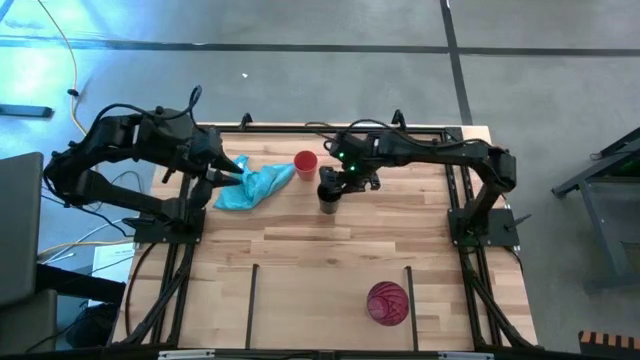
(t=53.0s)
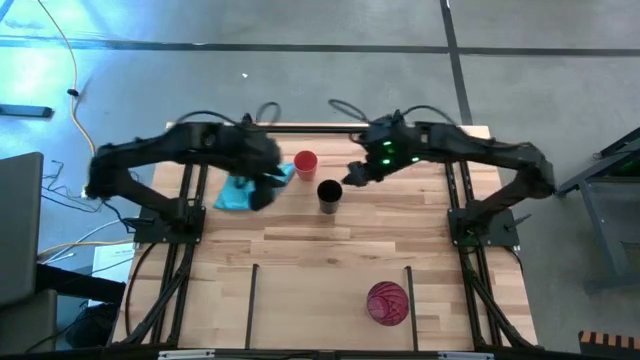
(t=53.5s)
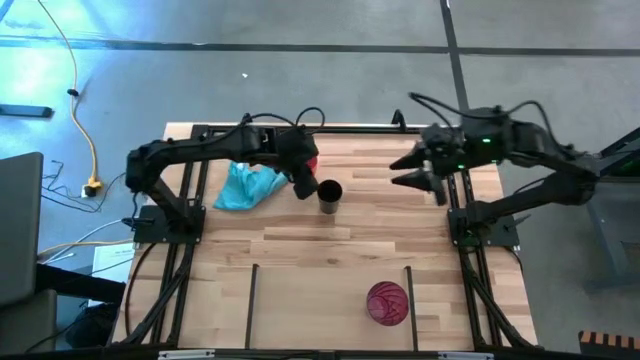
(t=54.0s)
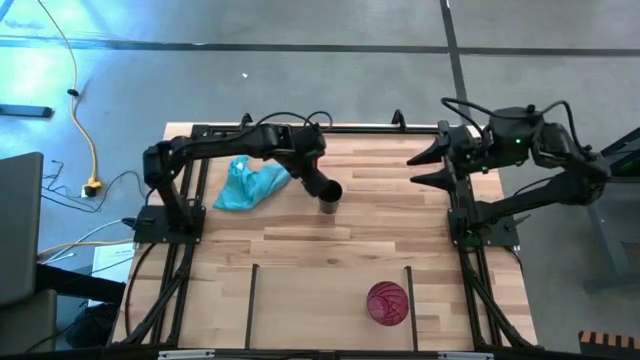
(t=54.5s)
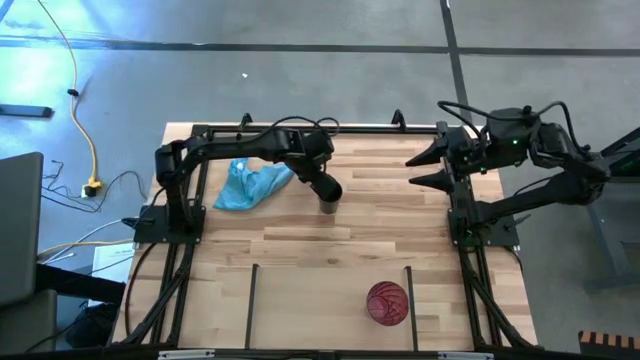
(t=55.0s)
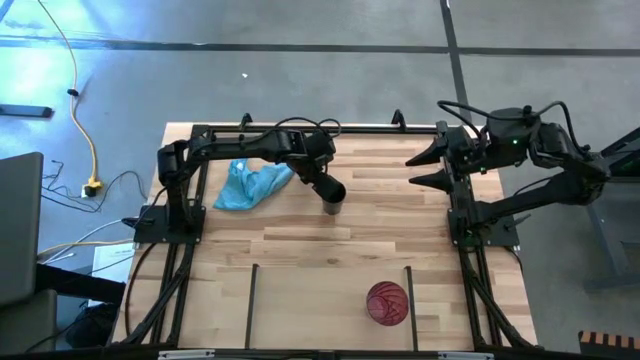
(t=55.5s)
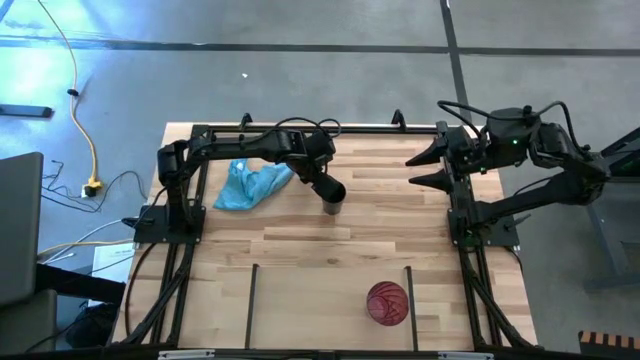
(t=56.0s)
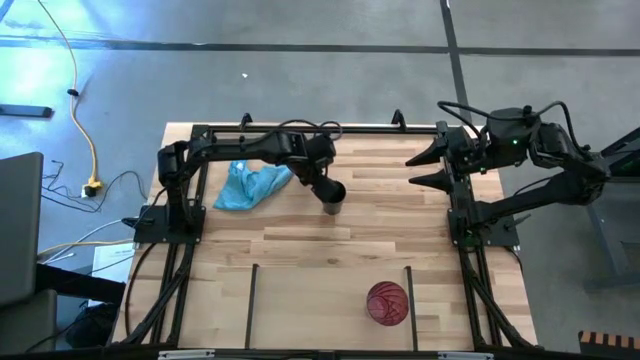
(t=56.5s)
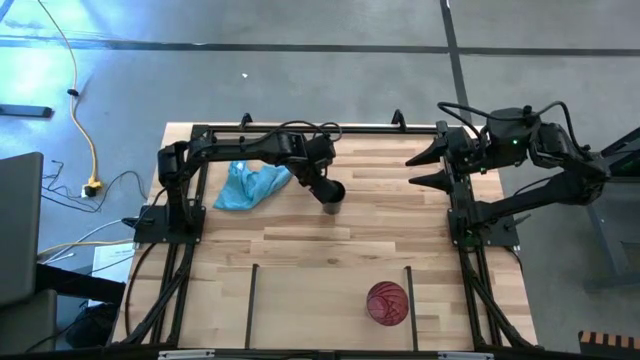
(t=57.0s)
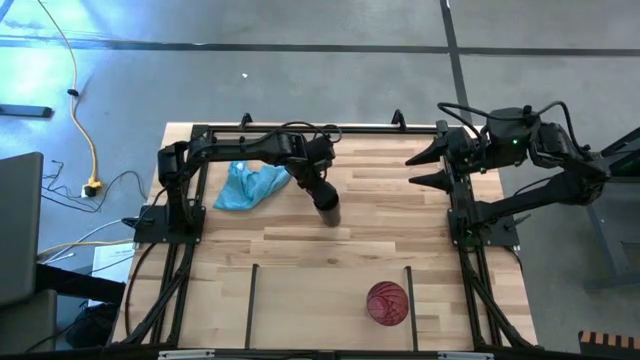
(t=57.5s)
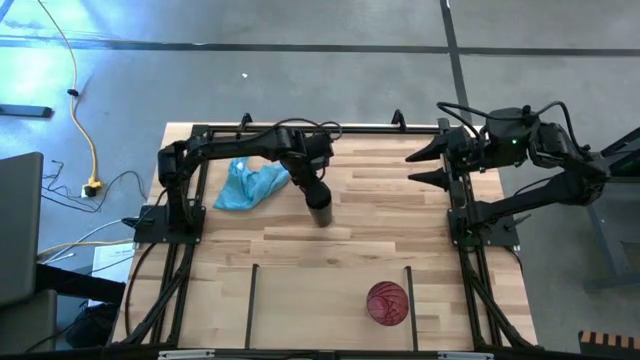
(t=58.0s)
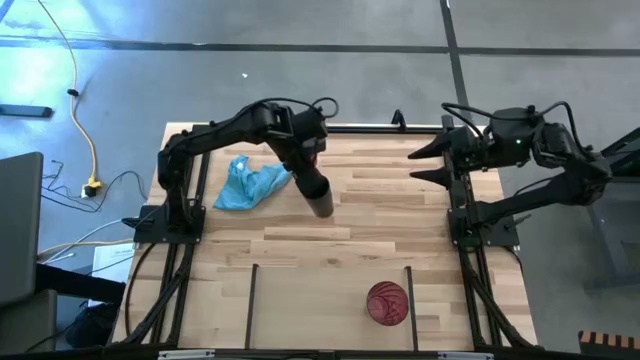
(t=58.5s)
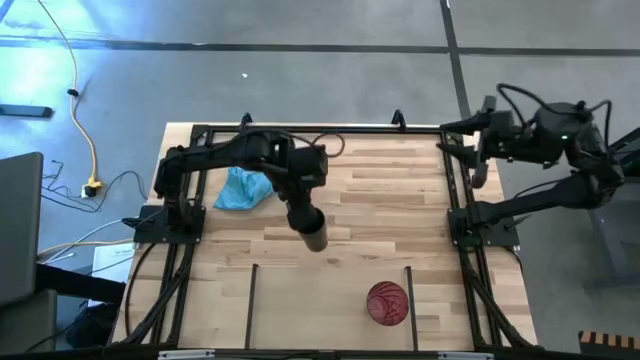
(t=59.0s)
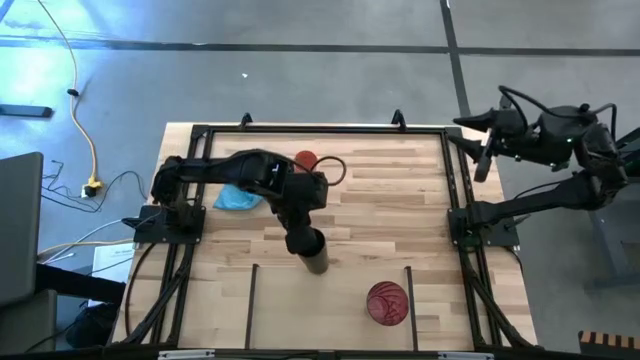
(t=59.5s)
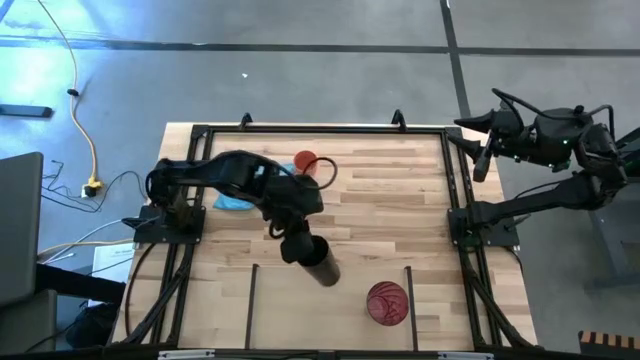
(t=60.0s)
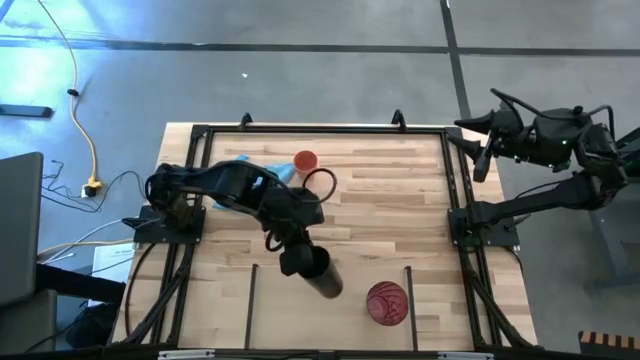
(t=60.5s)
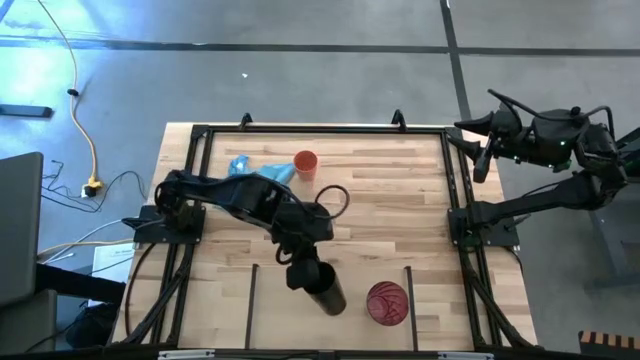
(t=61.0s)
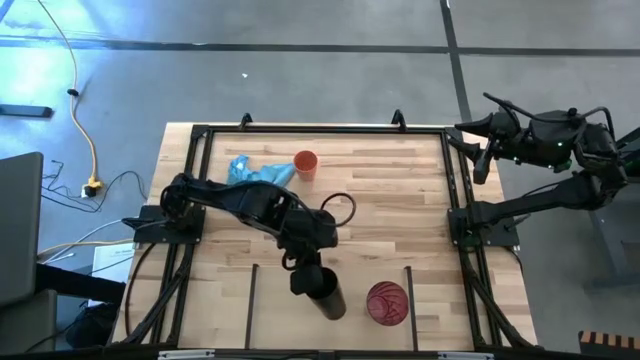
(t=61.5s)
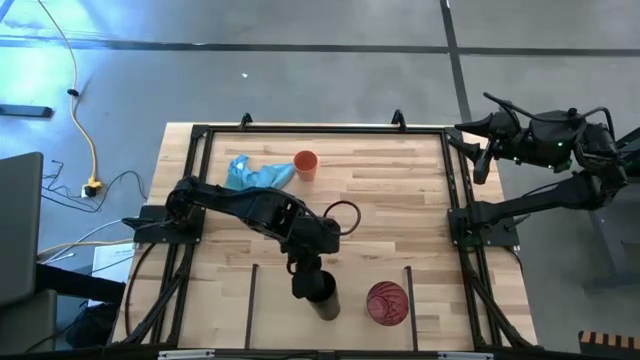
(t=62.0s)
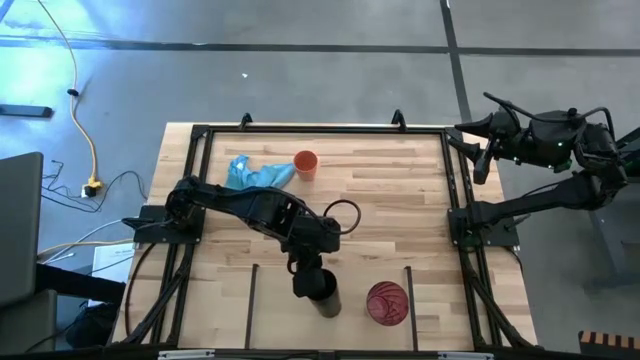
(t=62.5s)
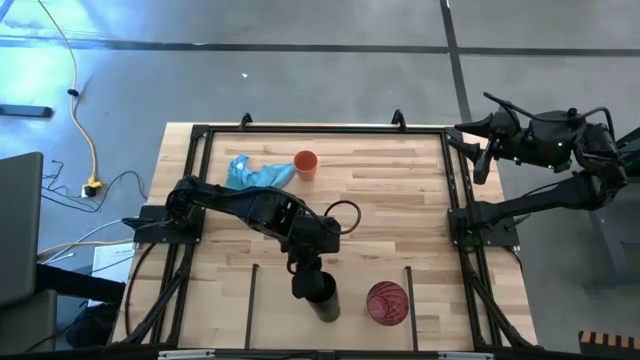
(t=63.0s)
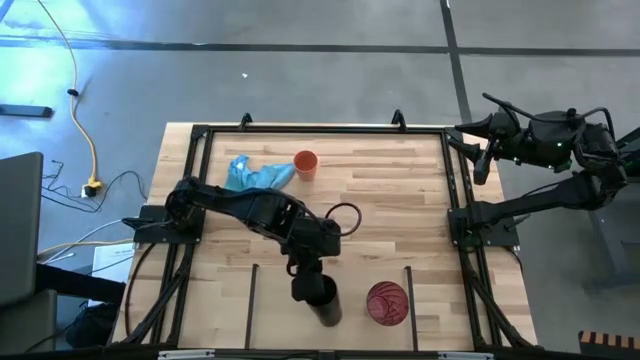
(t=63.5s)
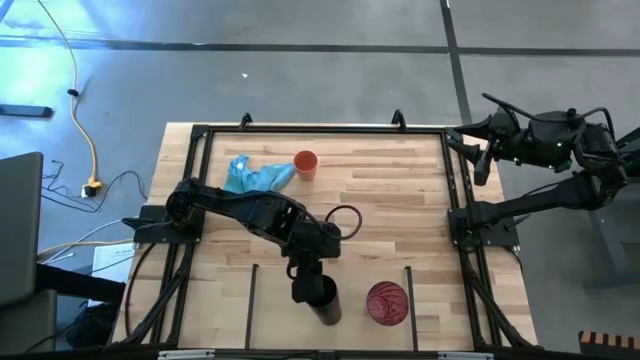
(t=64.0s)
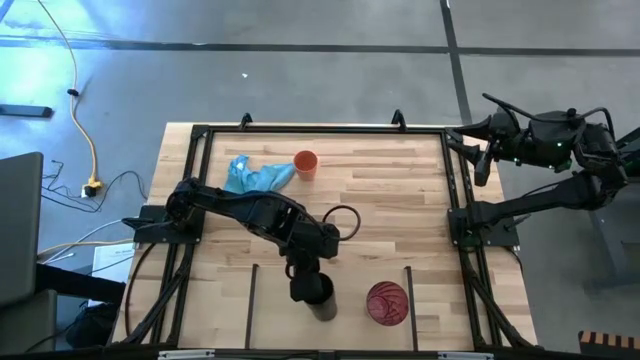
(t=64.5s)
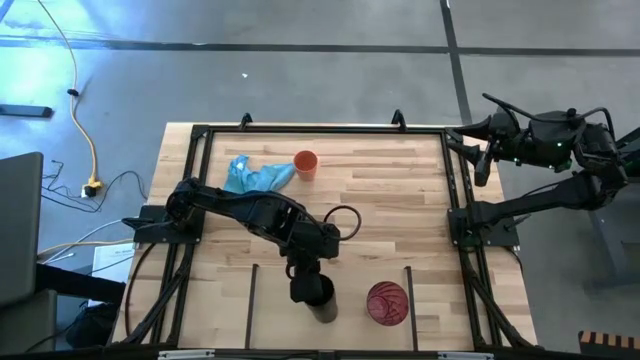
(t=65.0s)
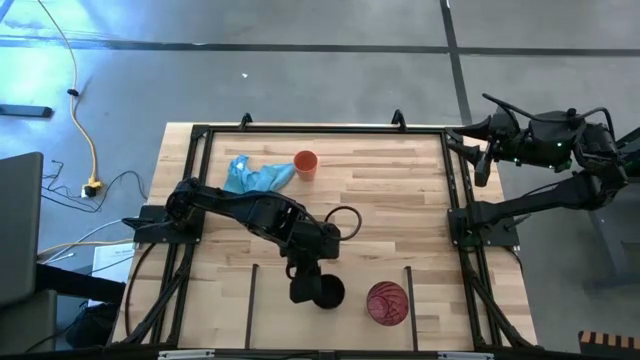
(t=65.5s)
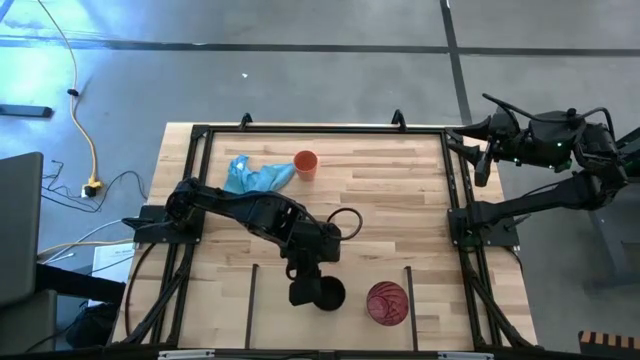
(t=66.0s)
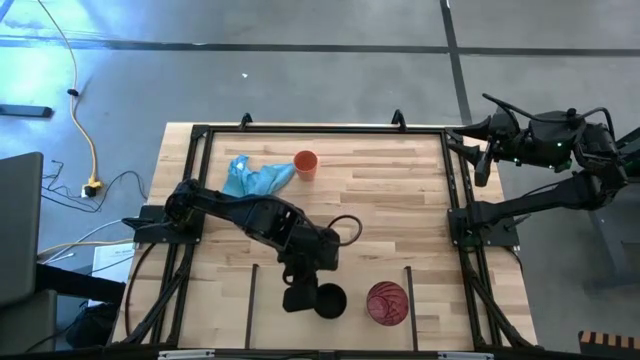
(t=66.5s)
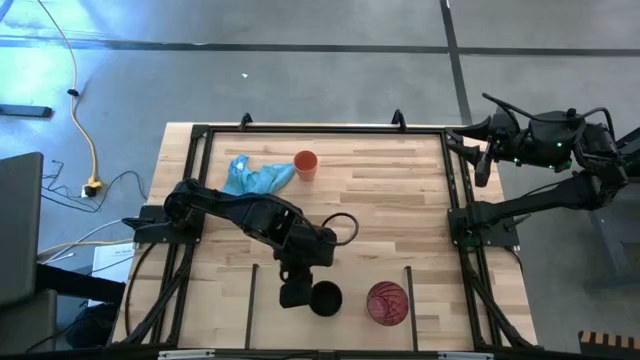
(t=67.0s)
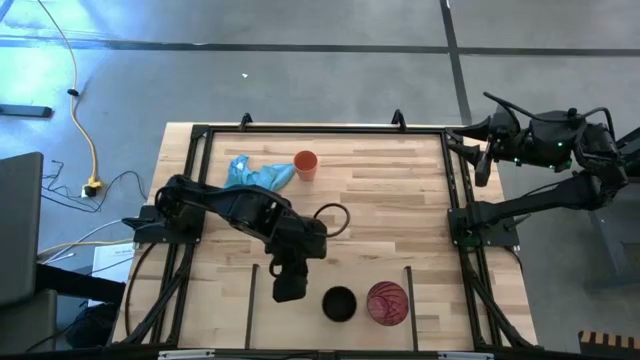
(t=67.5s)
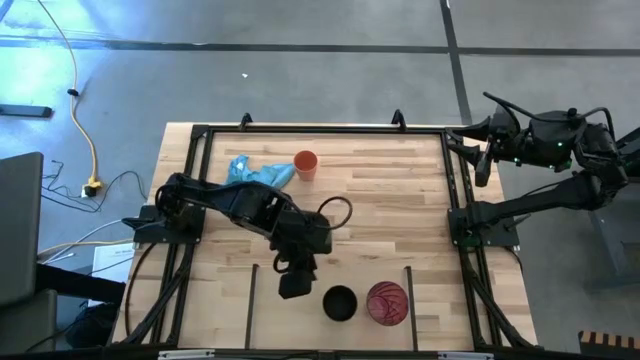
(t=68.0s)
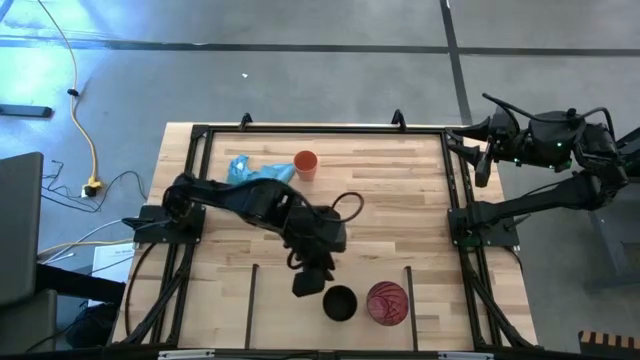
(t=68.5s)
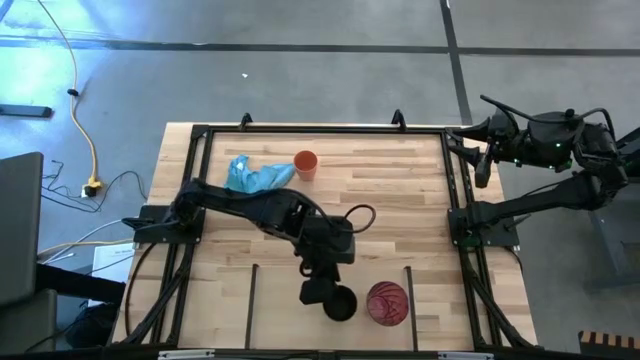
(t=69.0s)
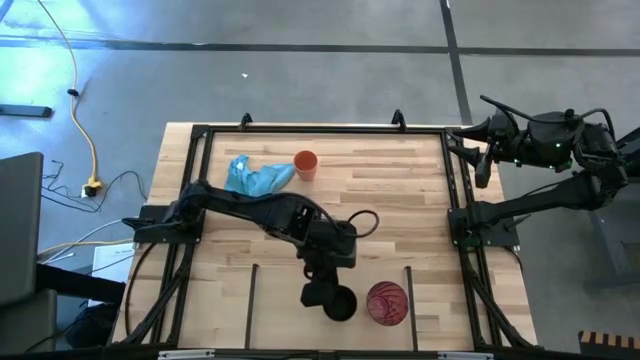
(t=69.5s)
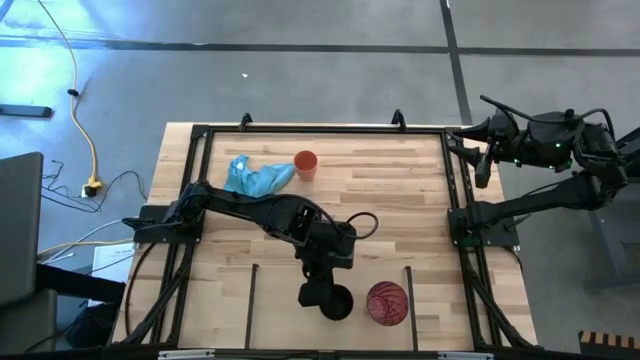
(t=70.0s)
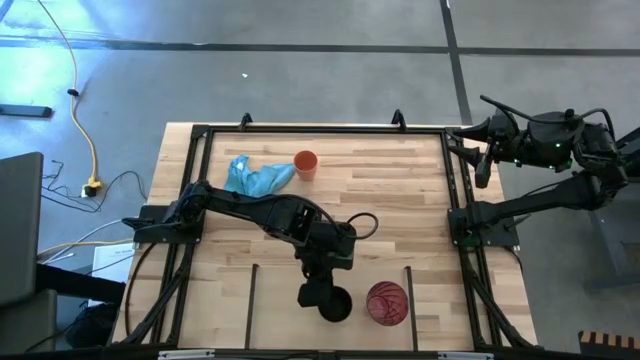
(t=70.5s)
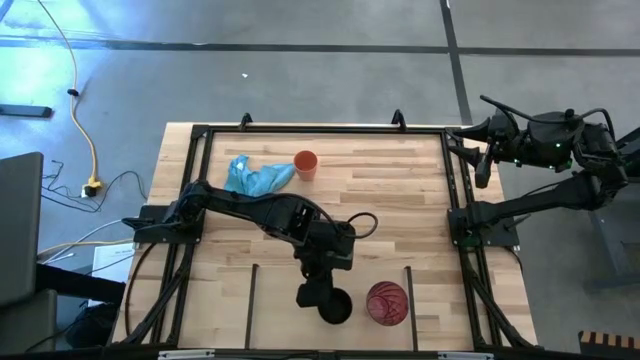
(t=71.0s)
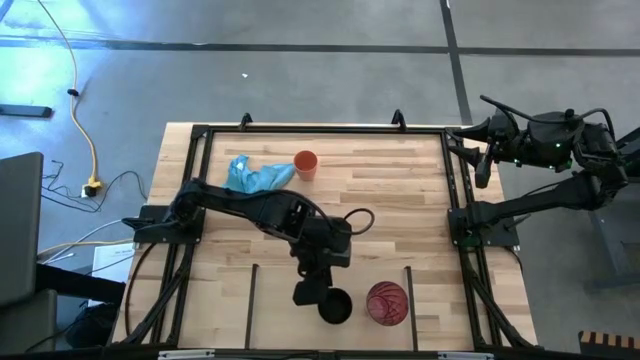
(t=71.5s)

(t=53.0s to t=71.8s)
Task: Stack small to large cups/mugs on shelf
Put the black cup on the shelf

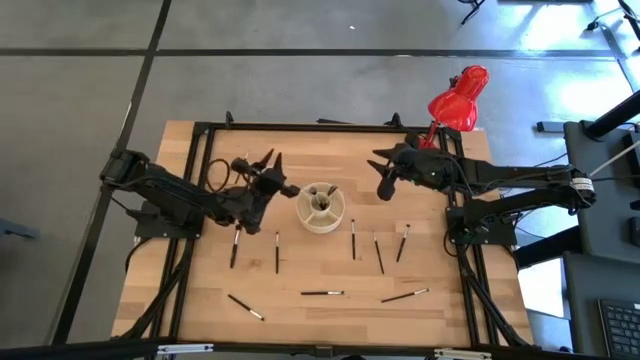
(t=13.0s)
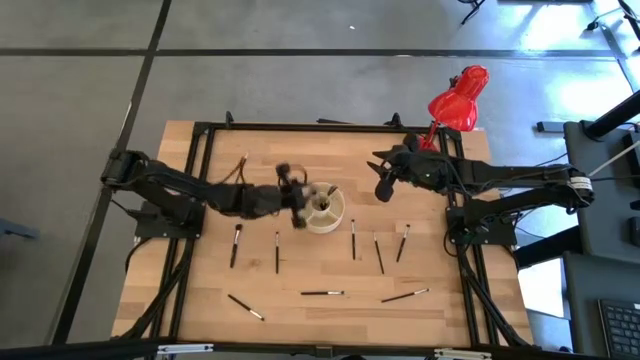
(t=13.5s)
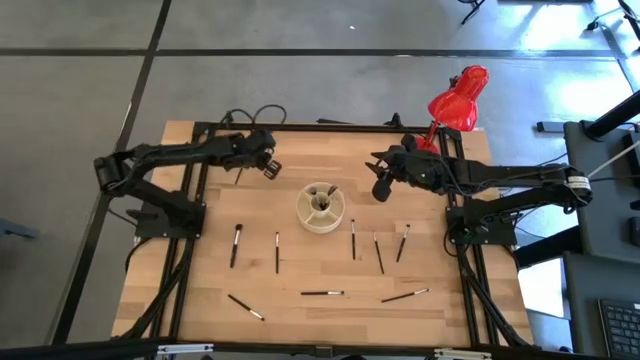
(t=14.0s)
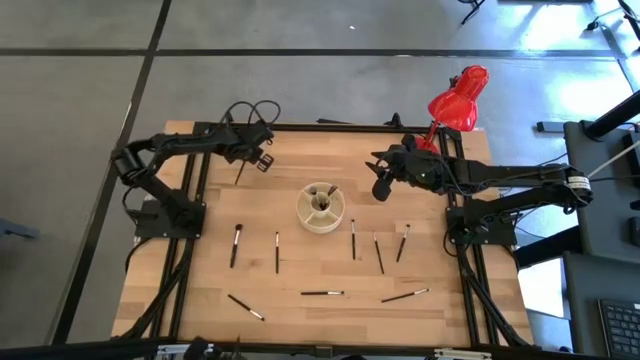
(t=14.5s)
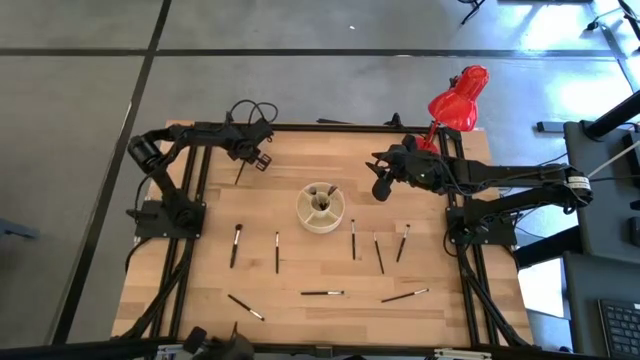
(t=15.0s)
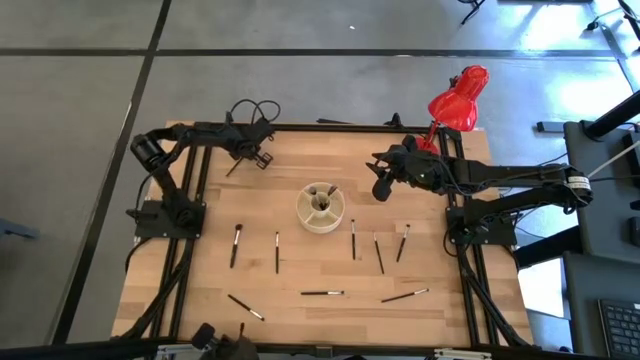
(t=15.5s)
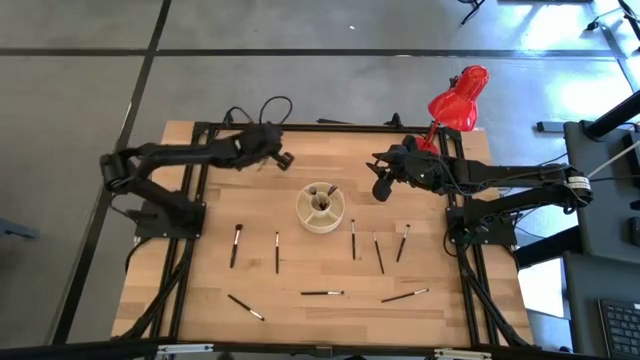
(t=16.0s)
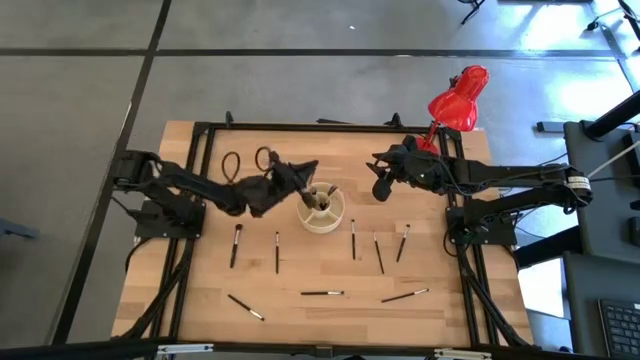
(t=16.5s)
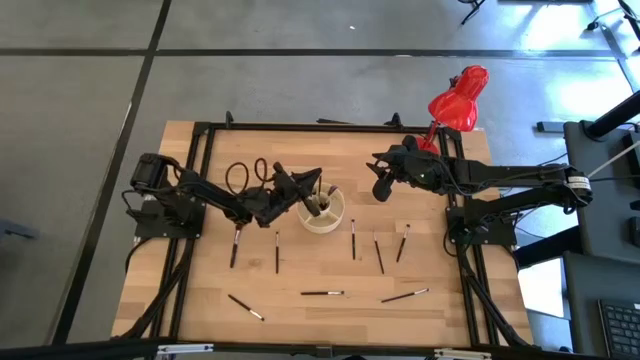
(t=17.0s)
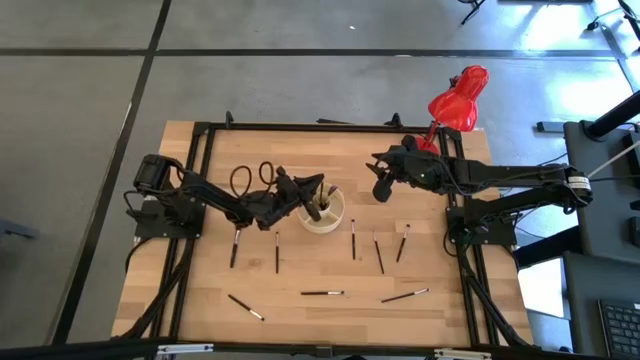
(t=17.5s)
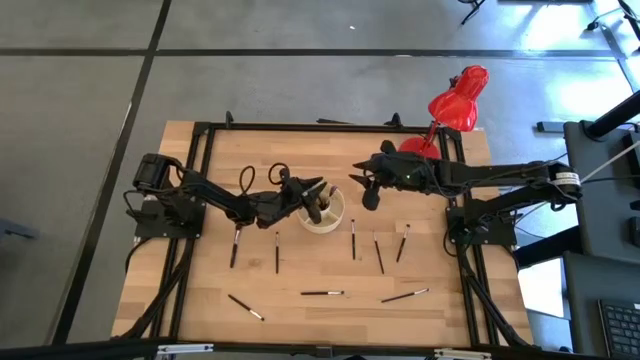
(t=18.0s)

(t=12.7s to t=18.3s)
Task: Put items in baskets/containers
Put the liner brush into the white organizer
